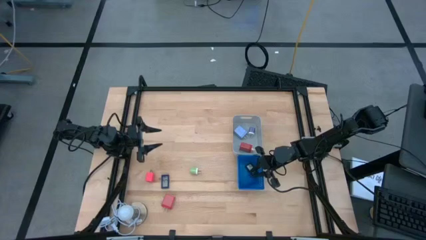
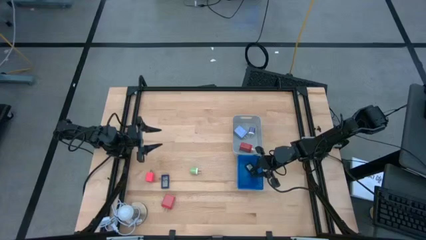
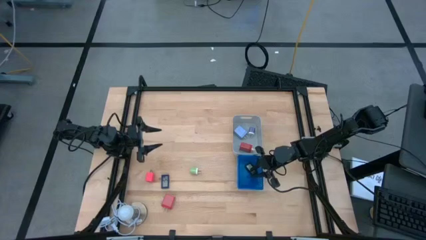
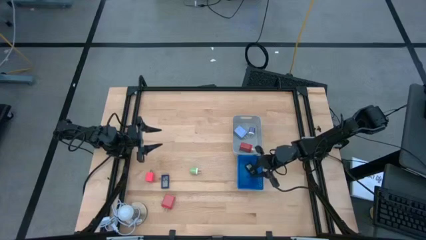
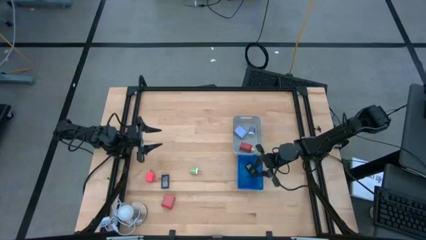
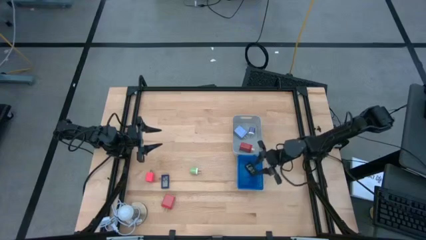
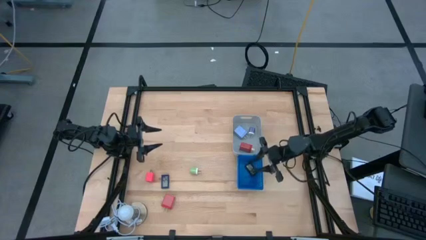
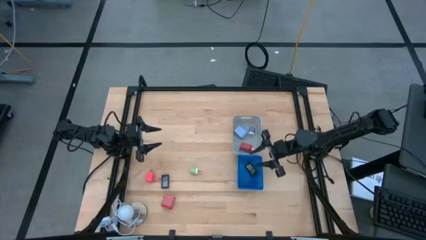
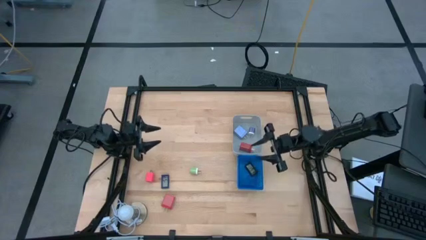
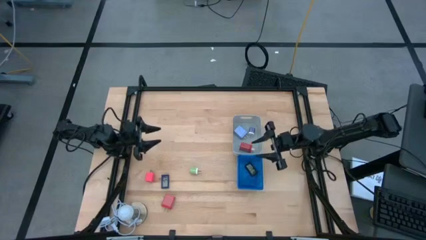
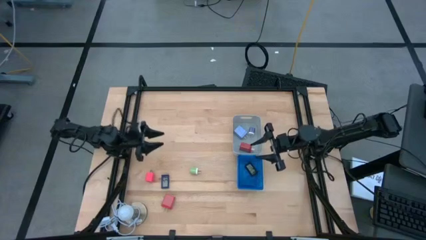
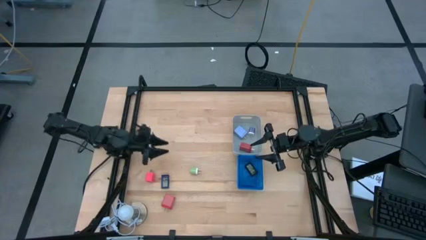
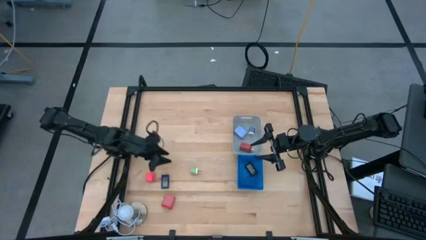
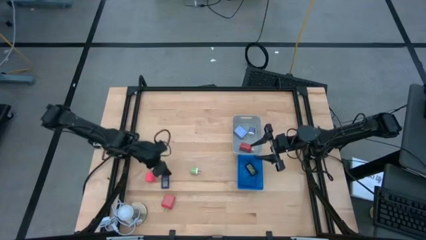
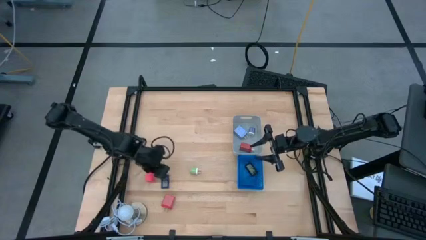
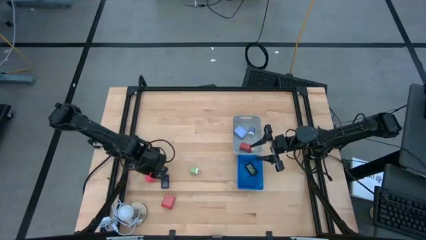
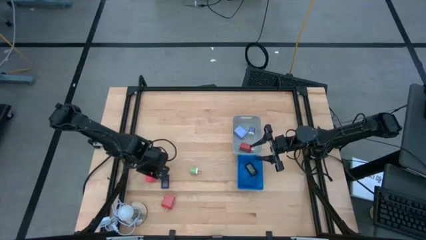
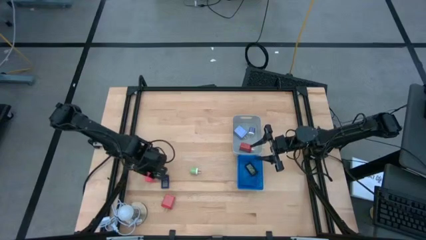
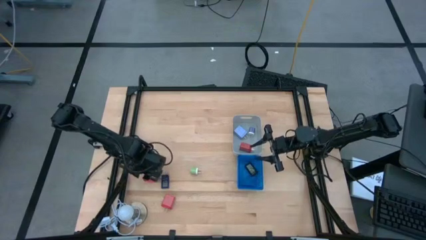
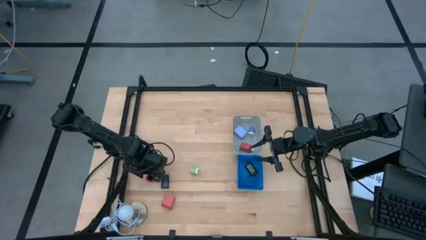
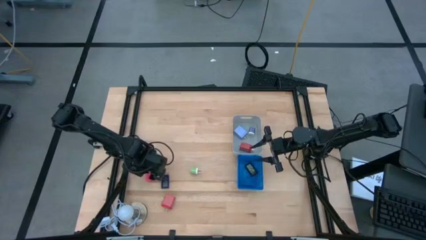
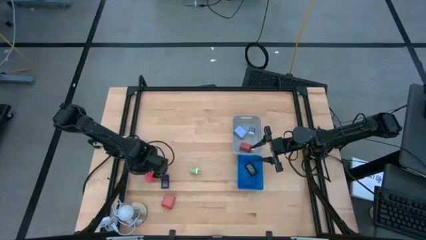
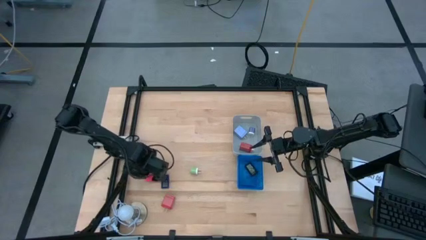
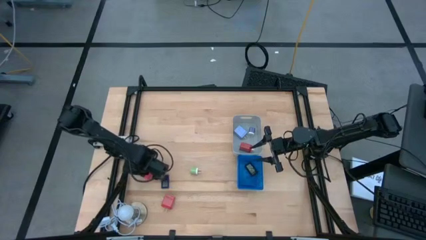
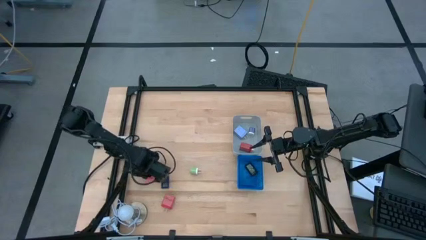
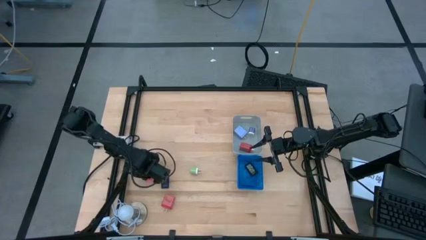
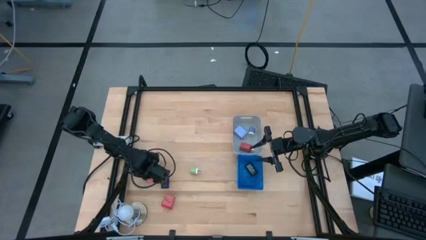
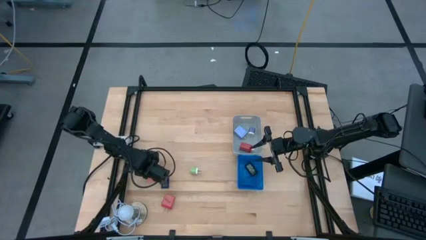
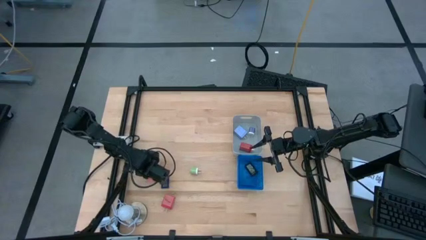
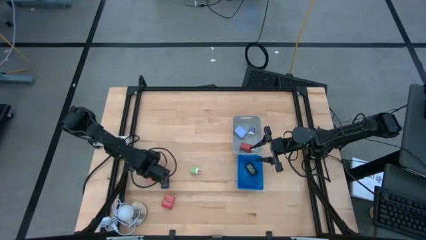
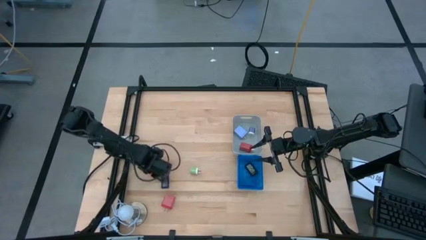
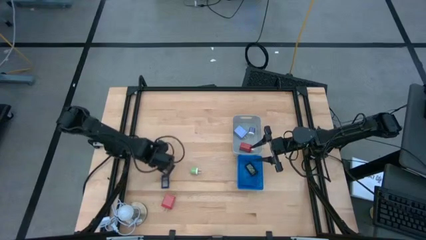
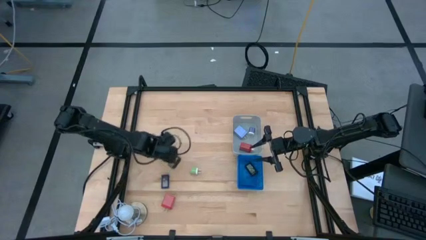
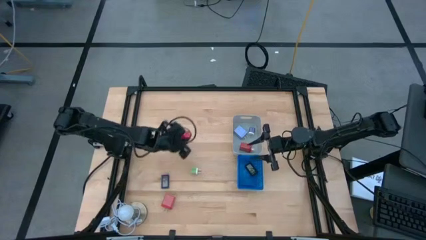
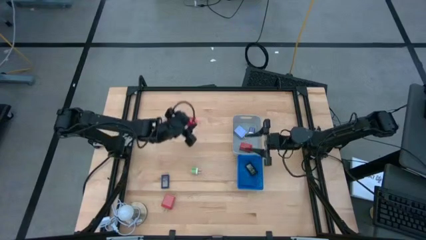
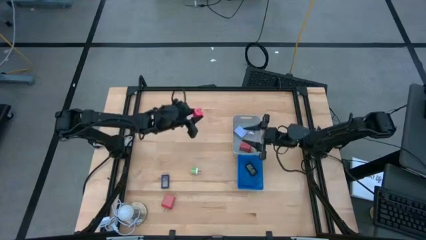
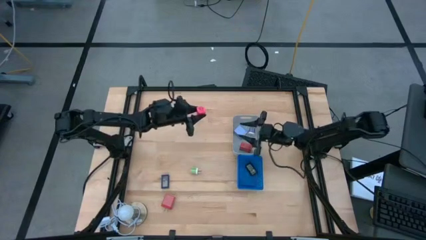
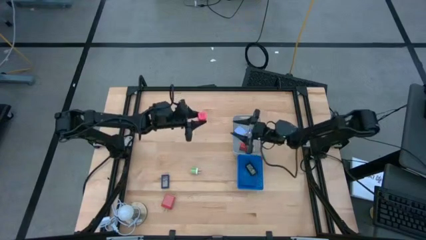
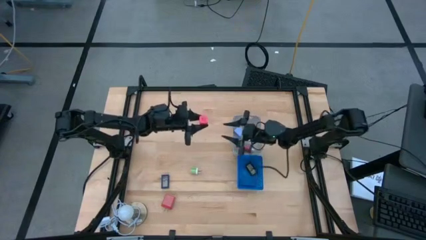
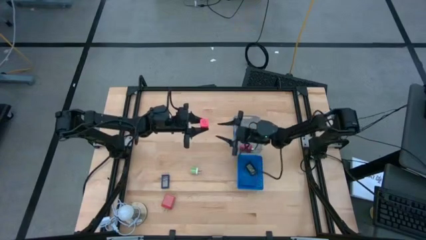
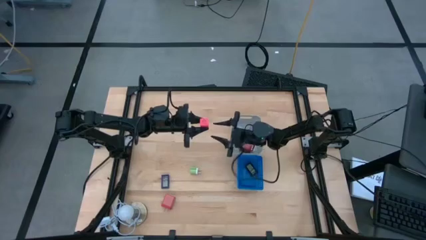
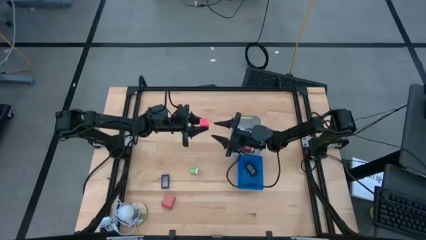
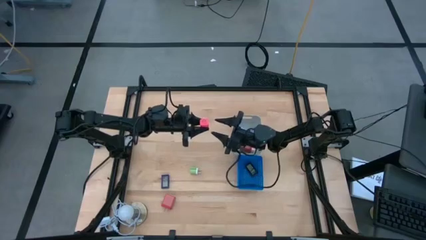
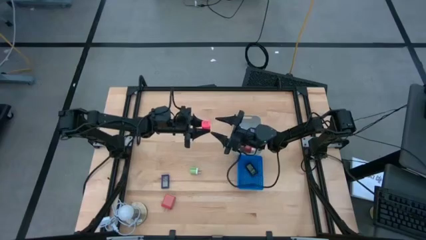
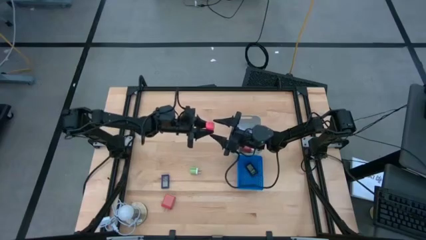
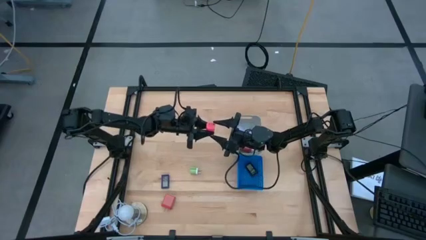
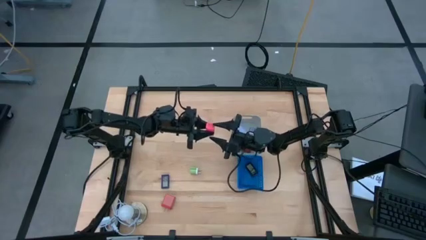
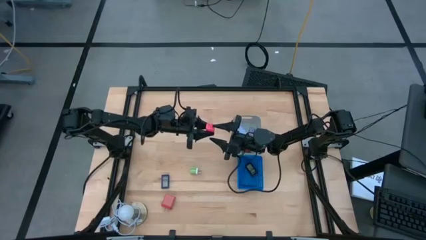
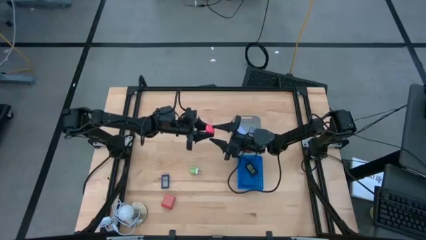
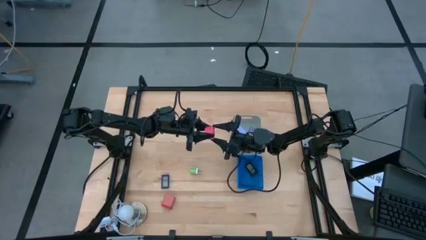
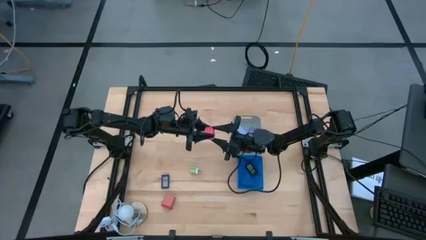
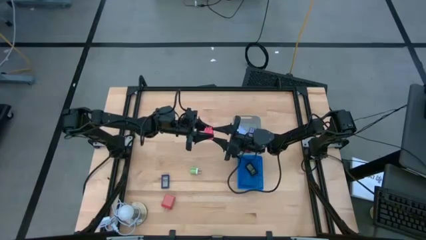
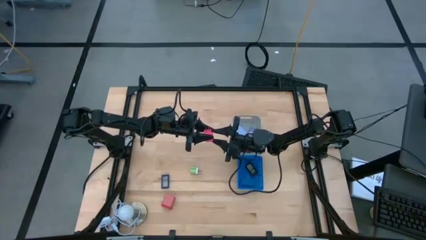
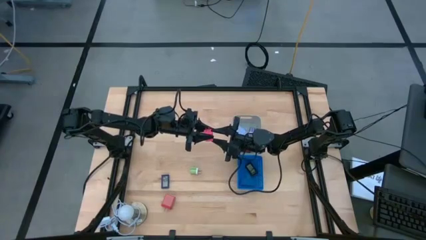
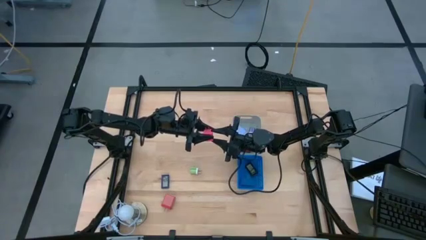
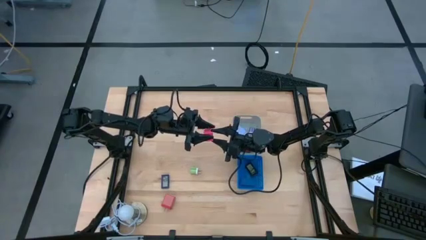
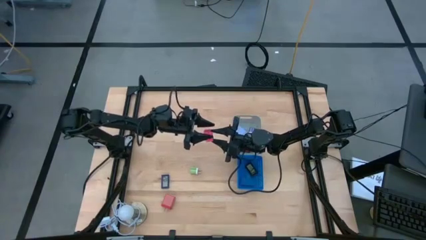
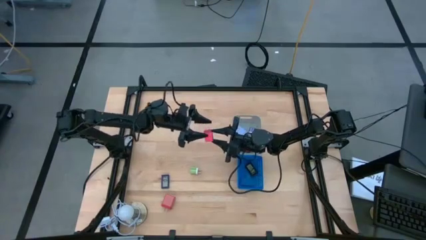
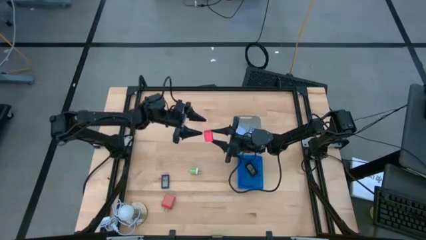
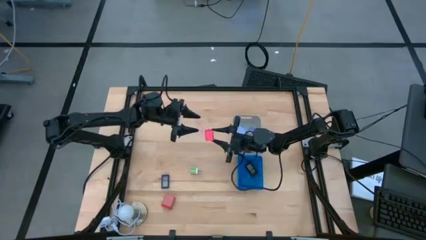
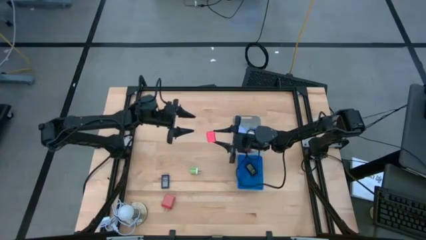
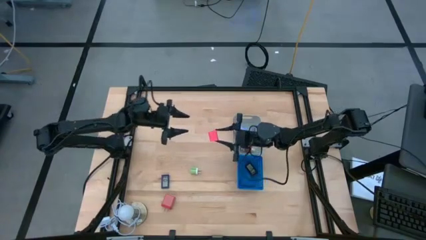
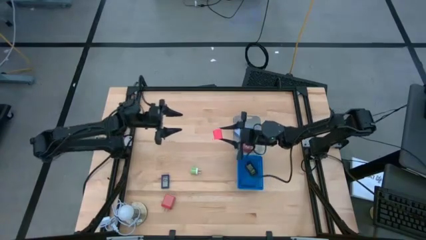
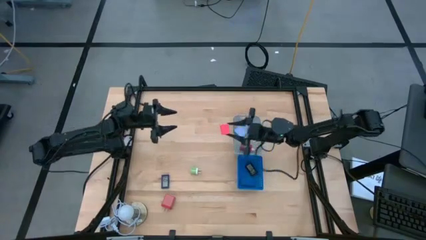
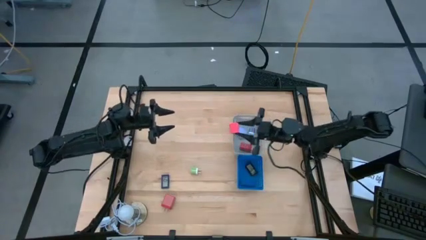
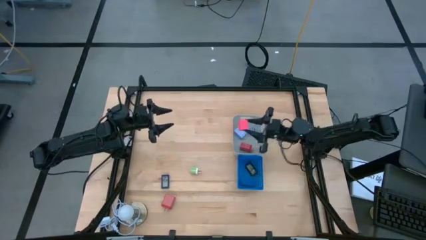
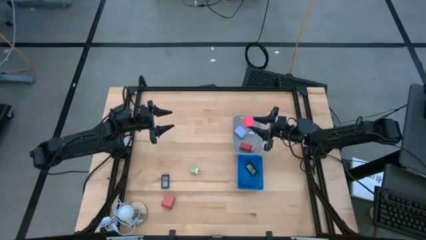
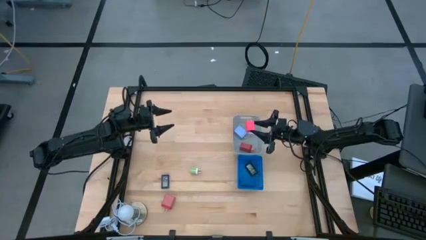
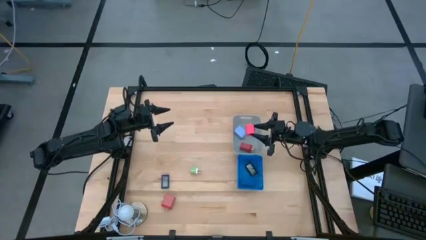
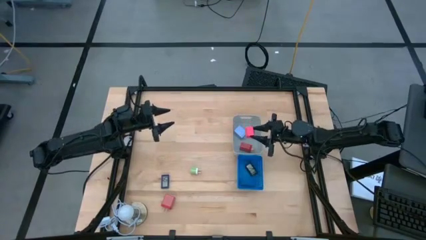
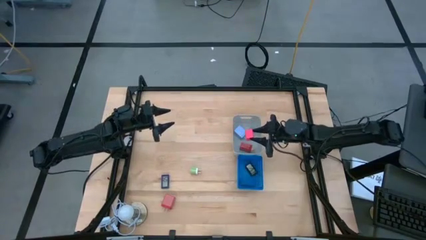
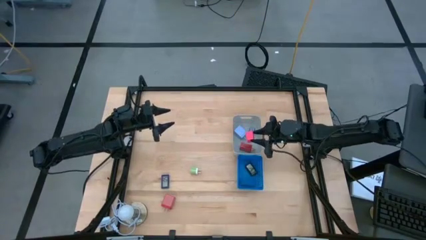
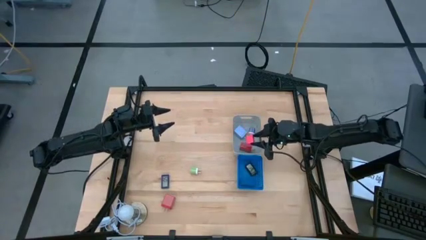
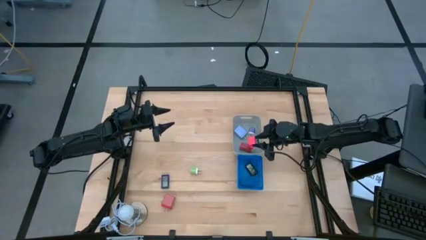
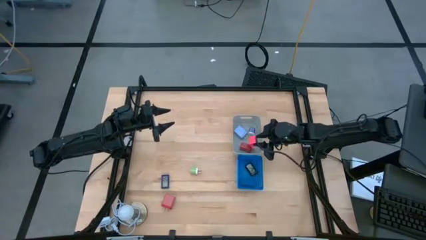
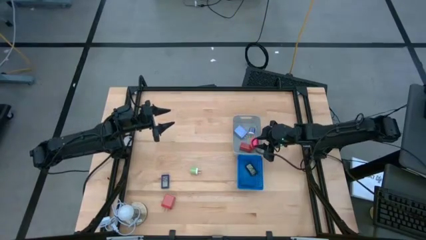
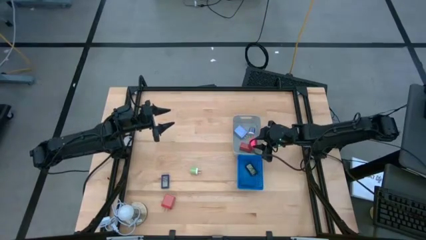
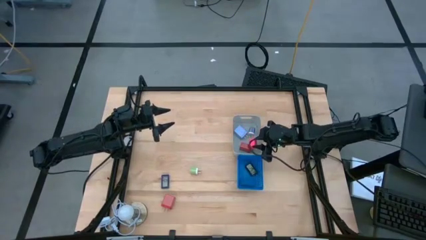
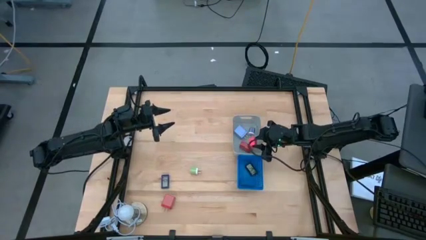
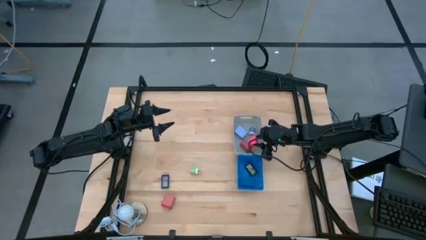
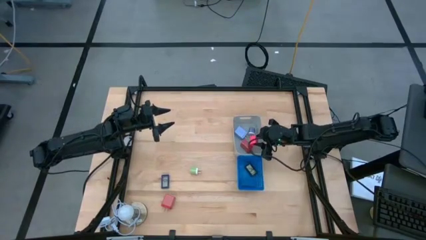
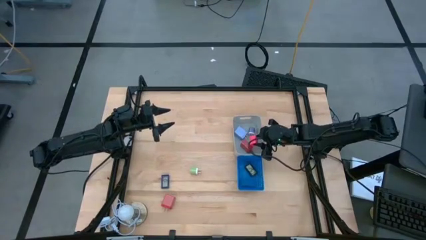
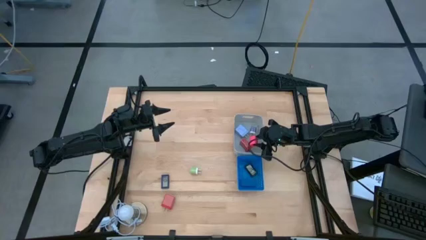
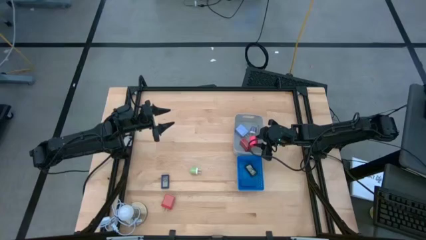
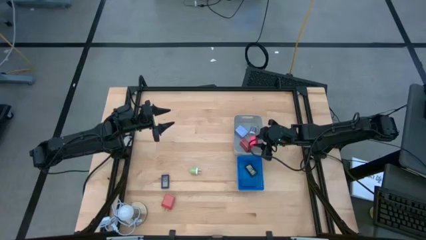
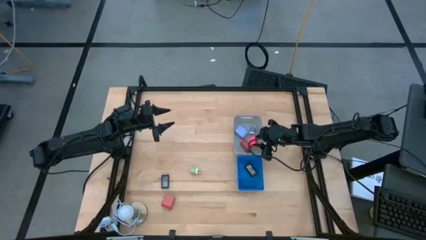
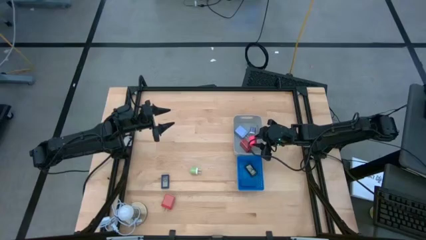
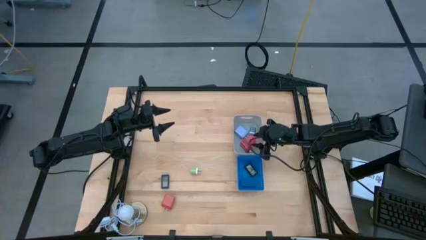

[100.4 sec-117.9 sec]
Task: Pick & Place Office items
Put the pink charger adapter into the gray bin

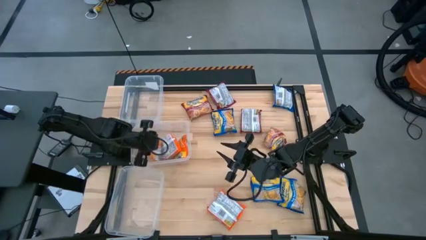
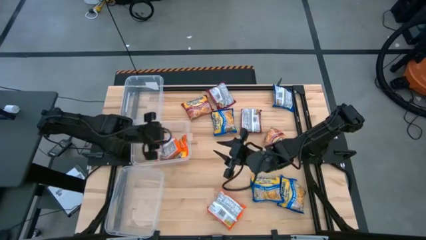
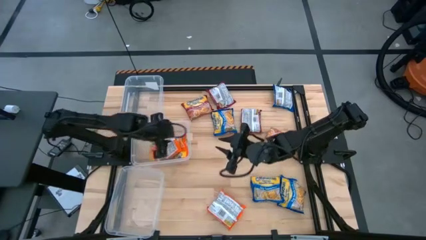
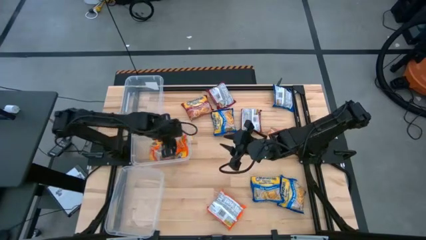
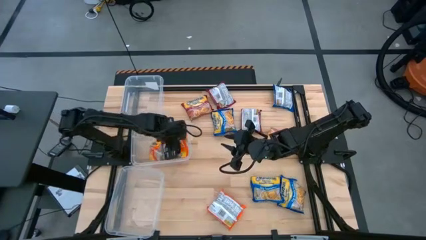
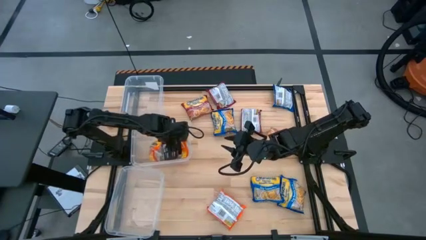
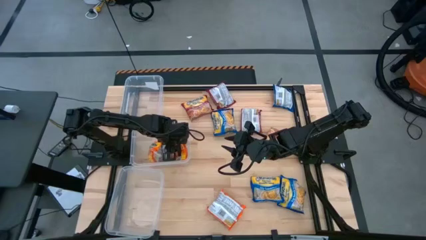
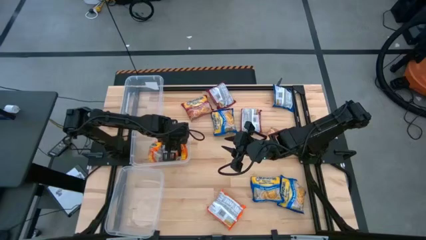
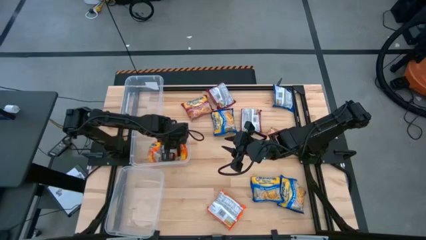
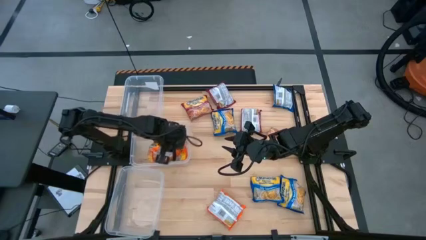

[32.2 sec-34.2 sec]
Task: Sort Maruchan noodles
Adjust the orange noodle pack
